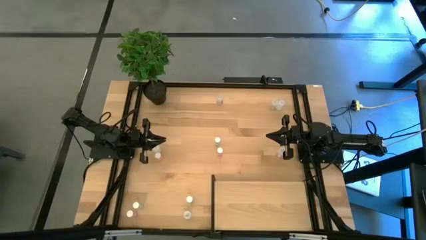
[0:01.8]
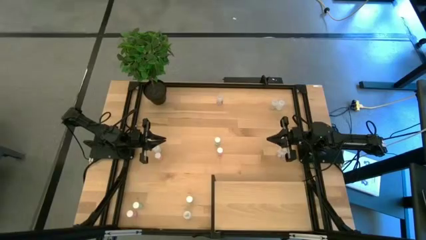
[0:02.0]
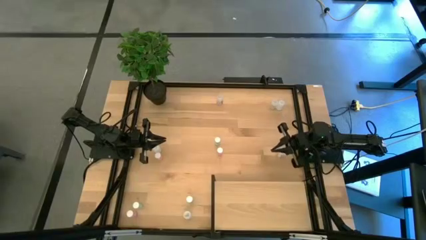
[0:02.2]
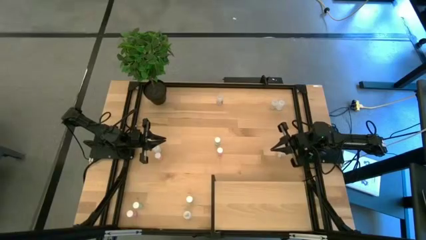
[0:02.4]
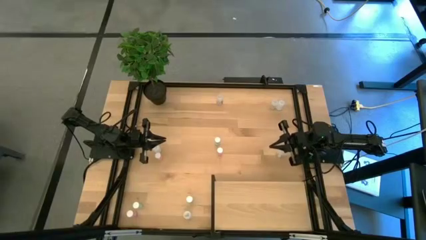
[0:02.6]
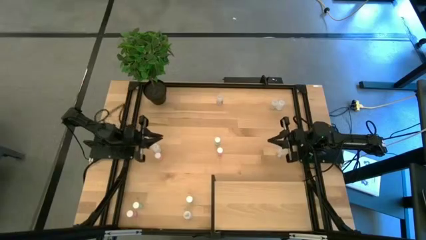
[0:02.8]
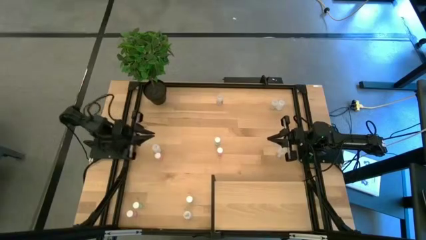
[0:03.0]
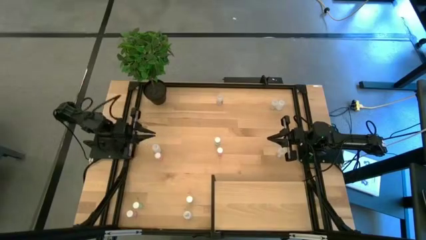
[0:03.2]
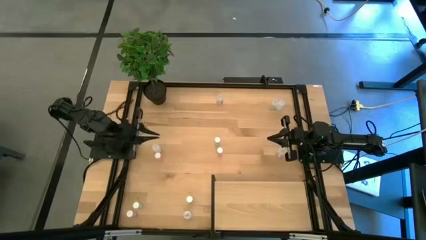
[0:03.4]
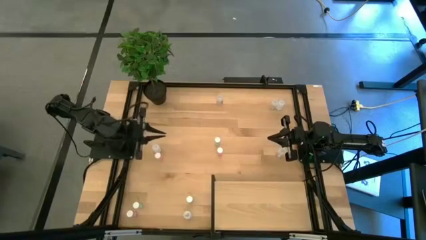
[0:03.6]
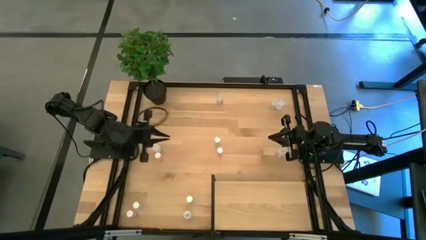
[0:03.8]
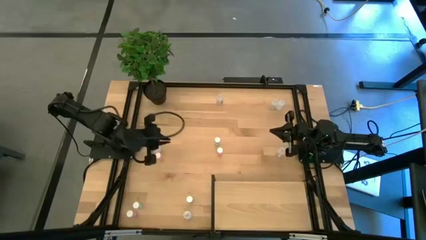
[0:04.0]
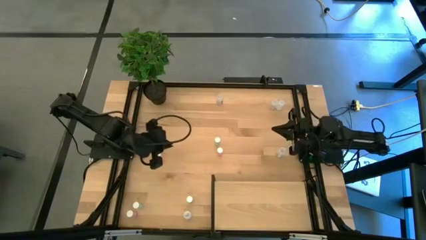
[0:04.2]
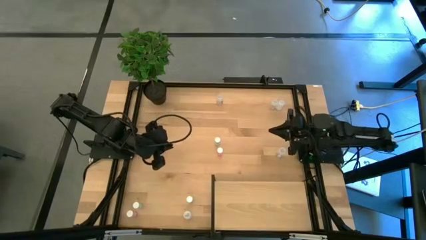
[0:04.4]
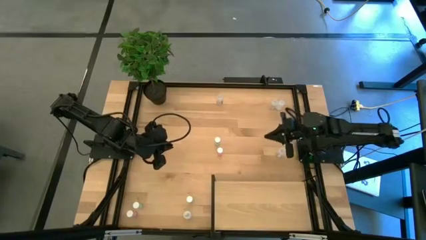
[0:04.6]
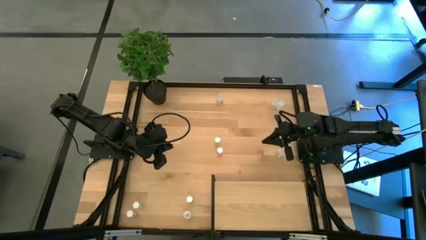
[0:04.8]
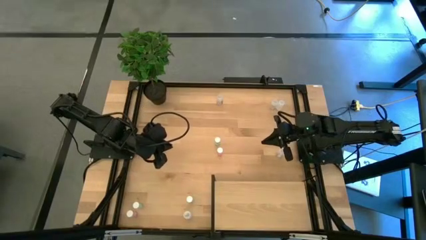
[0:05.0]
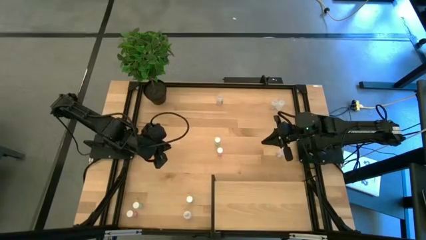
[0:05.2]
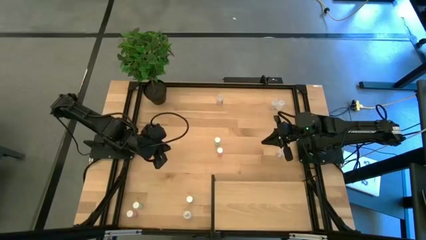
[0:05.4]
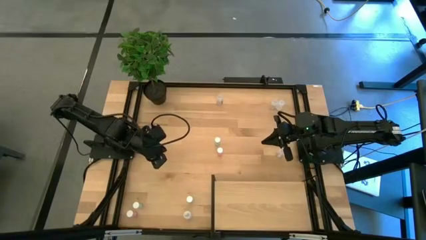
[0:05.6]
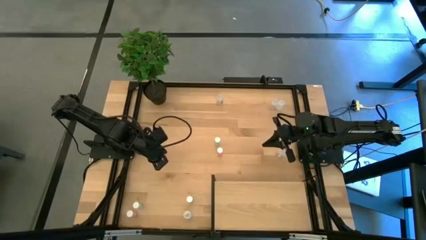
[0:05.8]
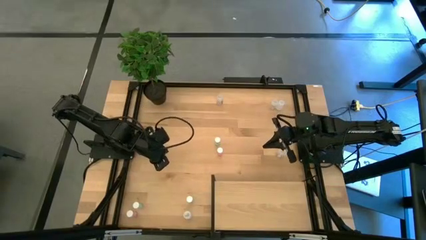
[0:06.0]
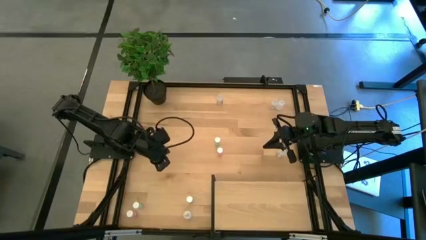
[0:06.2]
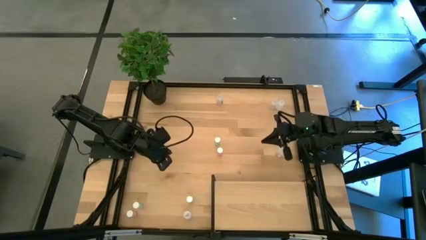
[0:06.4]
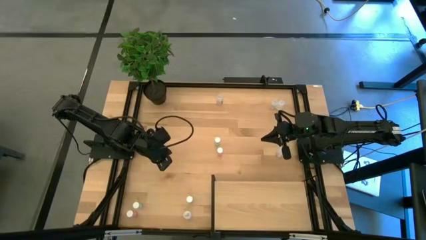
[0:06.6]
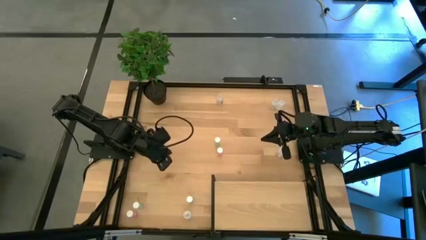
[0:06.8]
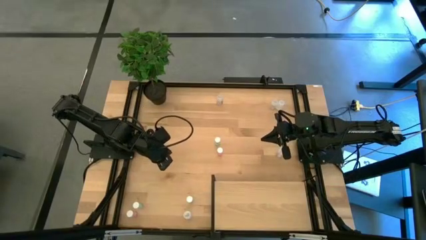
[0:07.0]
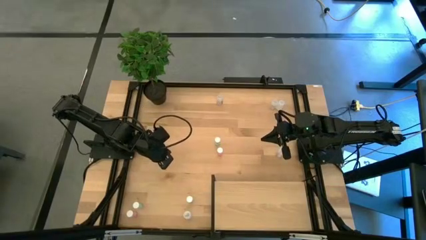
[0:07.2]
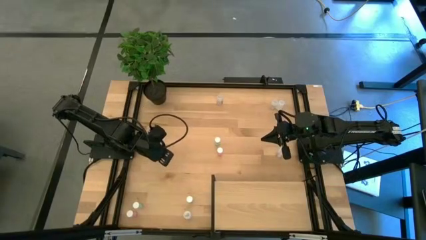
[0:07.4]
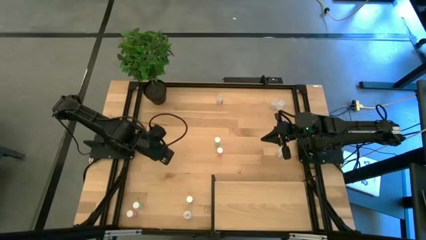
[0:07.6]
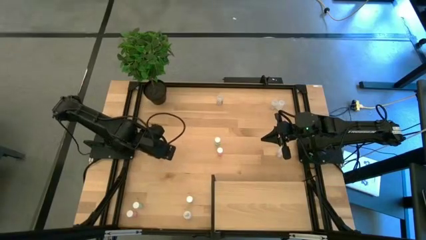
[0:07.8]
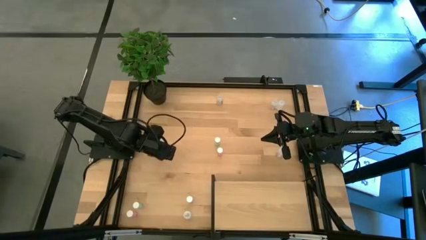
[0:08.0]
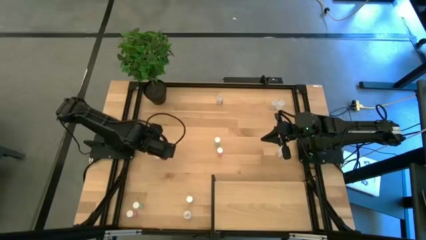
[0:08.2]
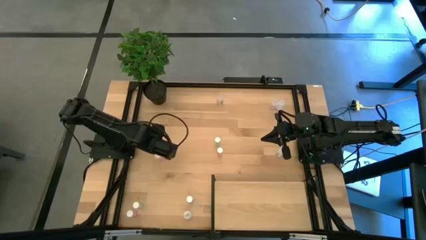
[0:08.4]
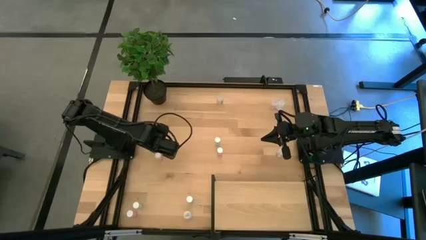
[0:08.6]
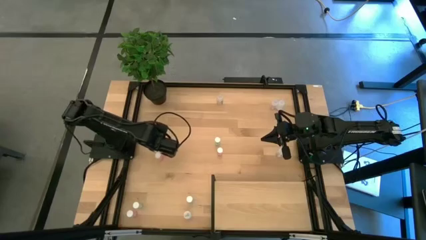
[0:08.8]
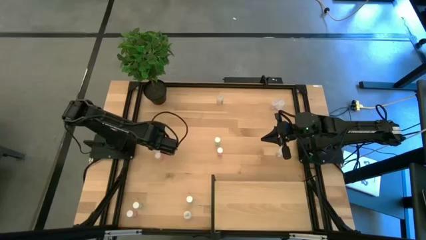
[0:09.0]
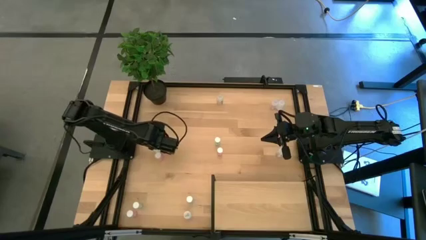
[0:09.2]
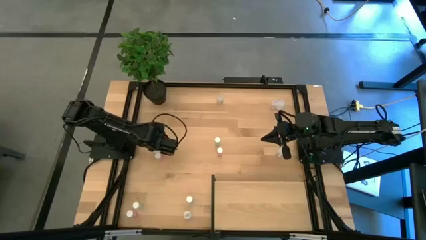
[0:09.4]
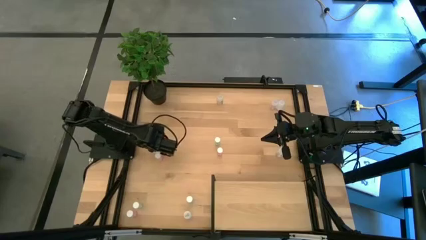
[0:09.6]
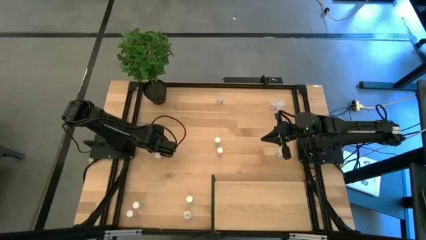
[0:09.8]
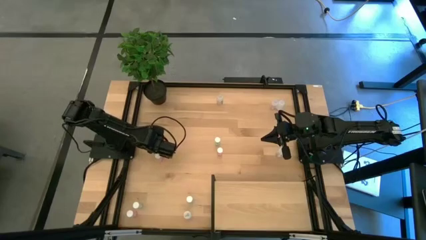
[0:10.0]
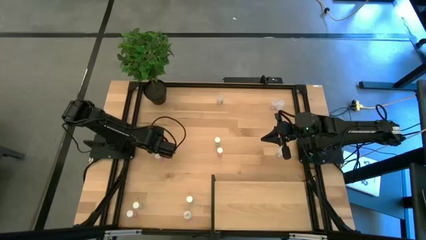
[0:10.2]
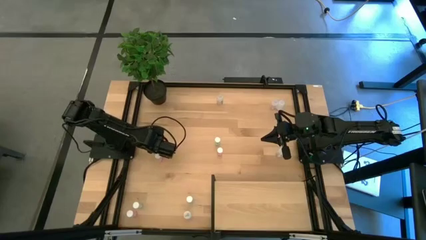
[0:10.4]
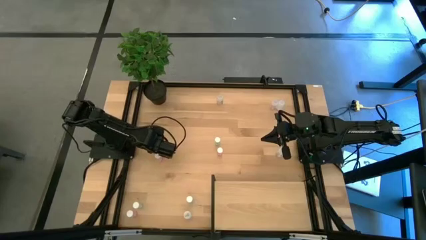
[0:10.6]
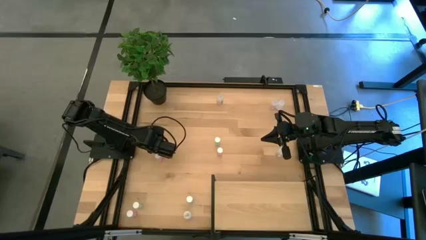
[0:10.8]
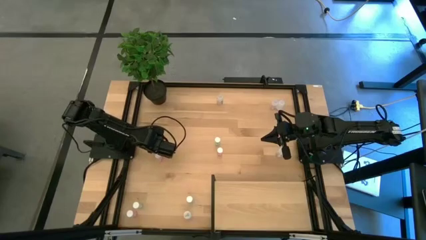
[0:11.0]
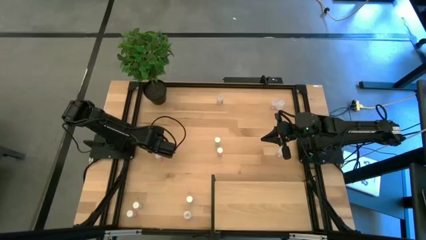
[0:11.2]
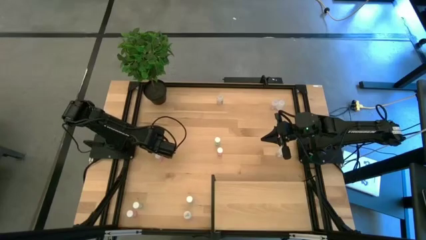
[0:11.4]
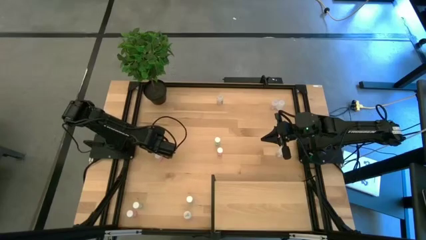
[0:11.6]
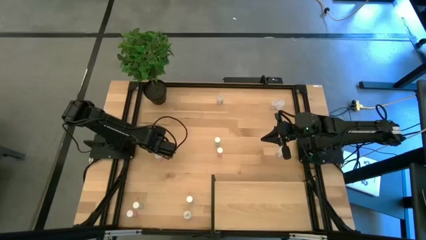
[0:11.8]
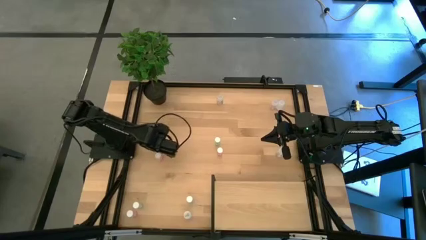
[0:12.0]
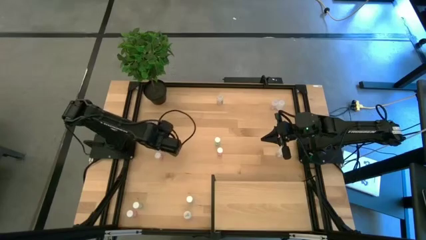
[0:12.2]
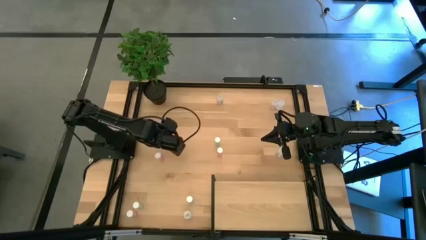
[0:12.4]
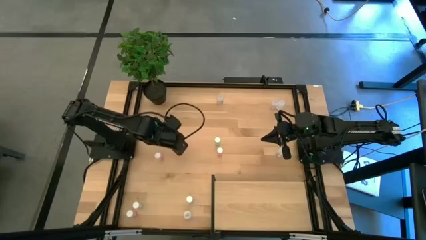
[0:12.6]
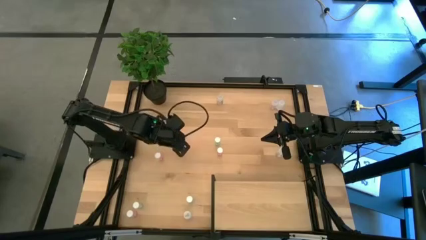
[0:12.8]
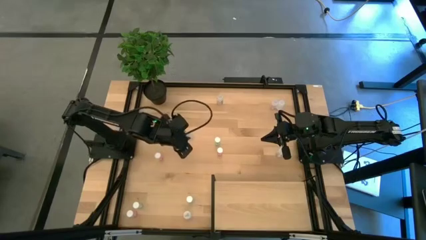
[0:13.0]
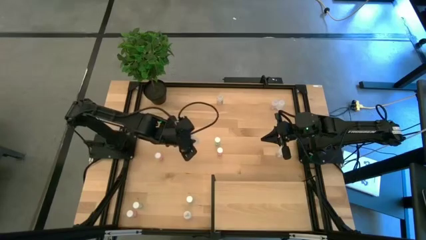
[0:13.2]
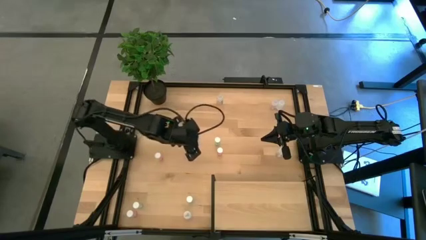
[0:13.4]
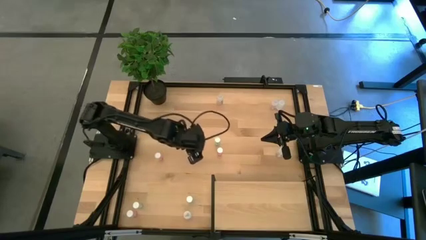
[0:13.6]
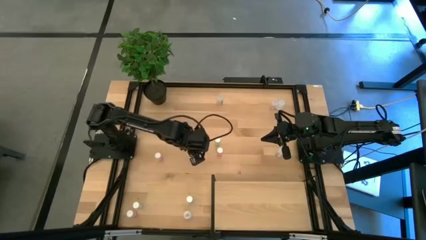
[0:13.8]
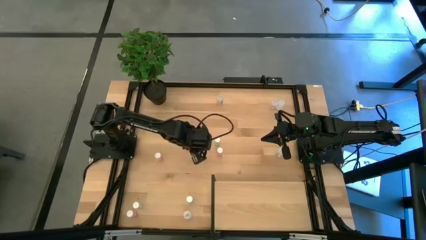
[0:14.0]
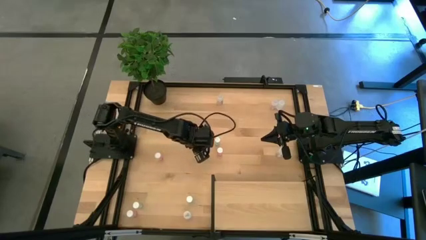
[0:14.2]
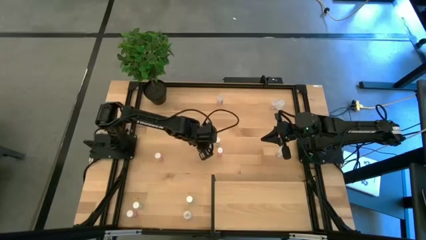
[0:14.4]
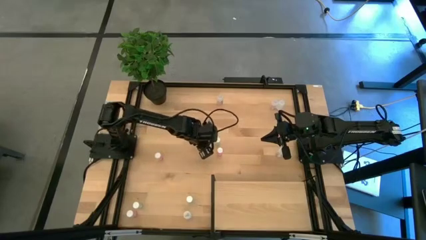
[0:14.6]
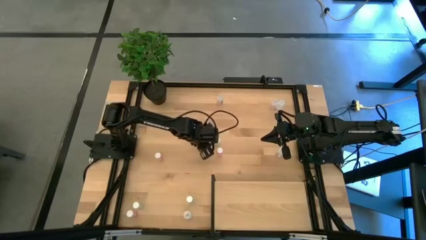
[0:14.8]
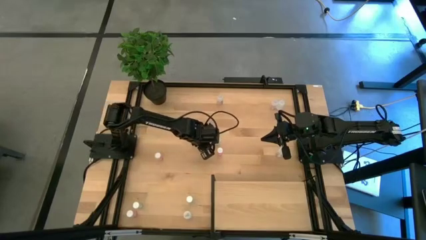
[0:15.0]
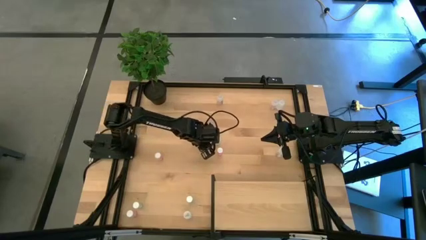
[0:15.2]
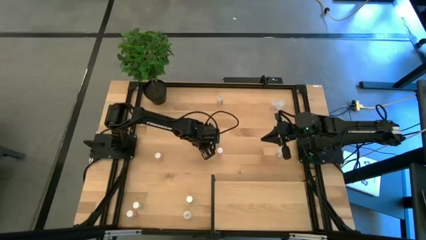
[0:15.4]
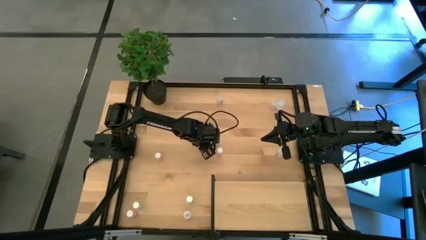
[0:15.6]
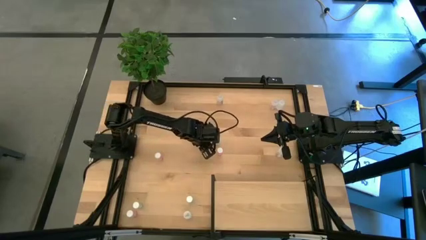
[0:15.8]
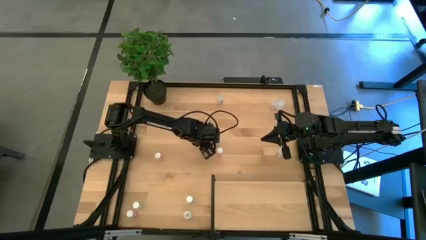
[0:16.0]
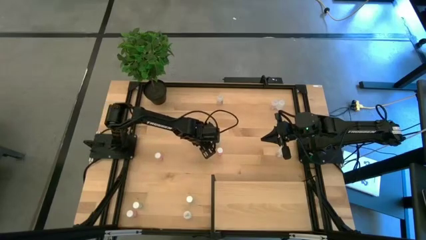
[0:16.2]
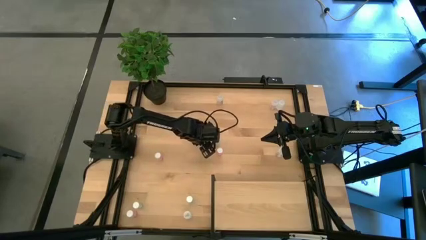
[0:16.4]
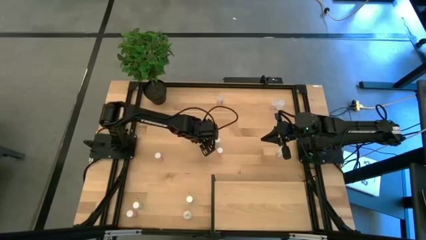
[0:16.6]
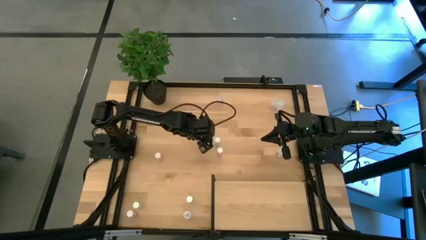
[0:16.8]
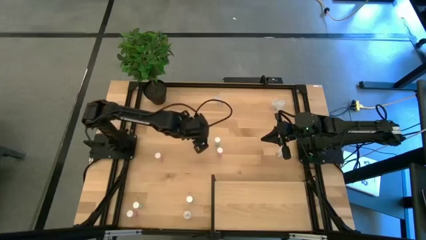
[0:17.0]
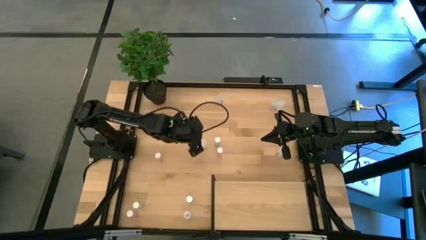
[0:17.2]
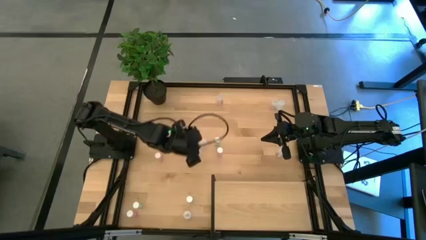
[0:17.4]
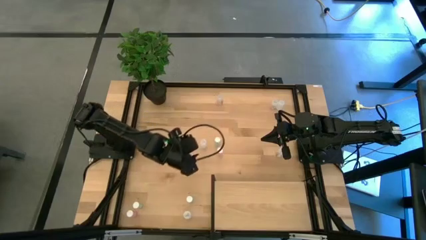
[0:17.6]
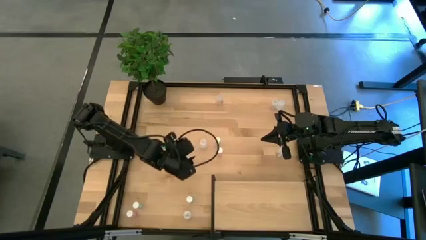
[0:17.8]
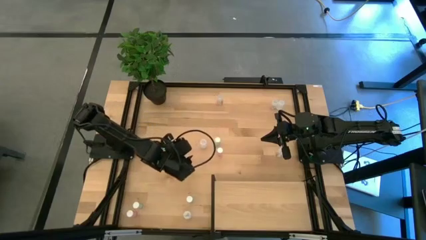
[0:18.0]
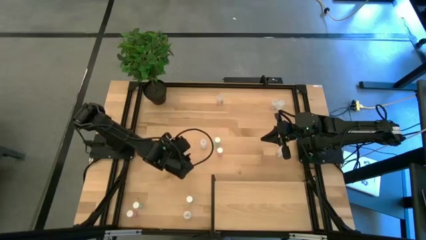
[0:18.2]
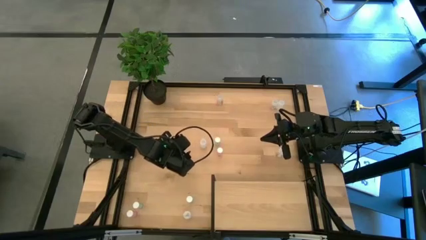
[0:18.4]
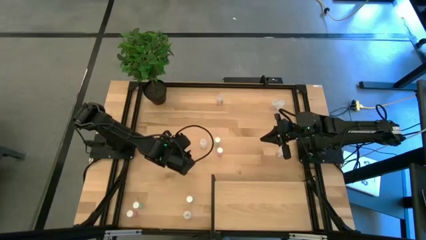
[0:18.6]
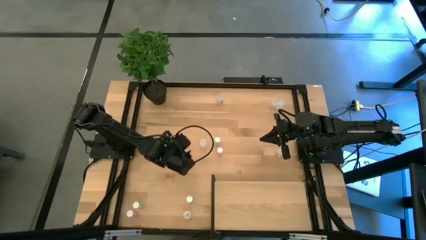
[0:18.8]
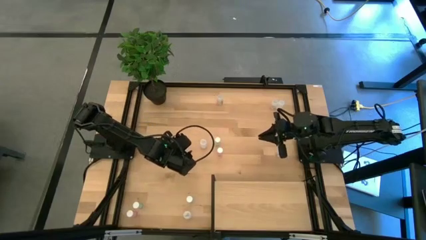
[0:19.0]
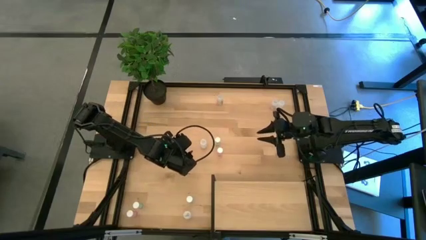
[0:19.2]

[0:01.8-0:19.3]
Task: Pick and place medicine bottles onto shelf by color
Put the left white pill bottle on the shelf
